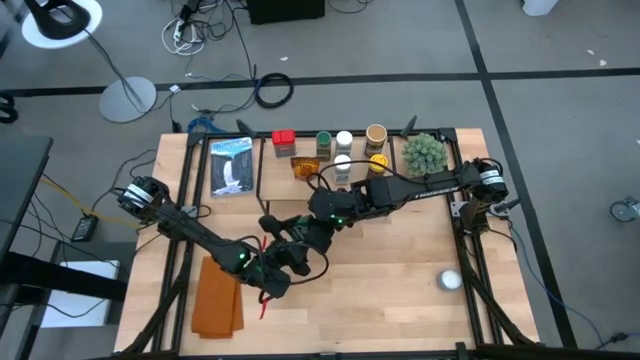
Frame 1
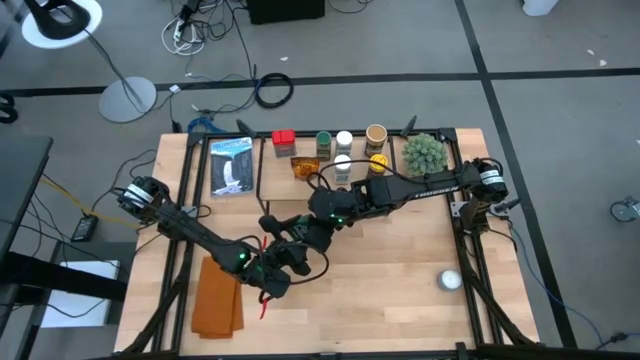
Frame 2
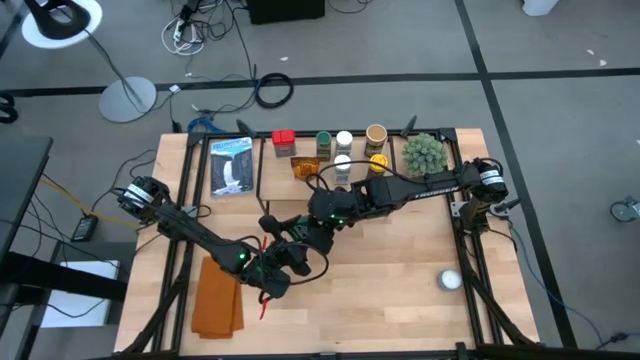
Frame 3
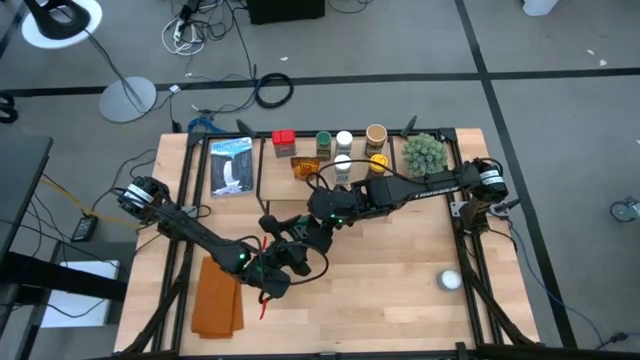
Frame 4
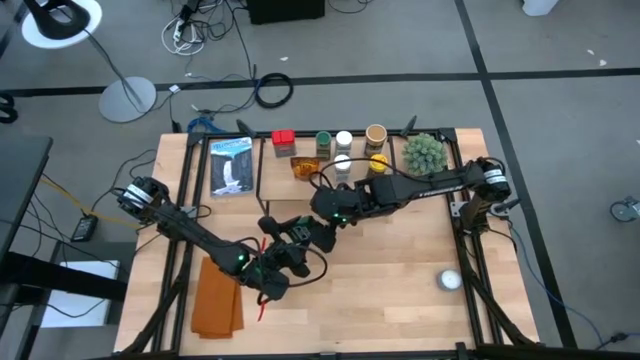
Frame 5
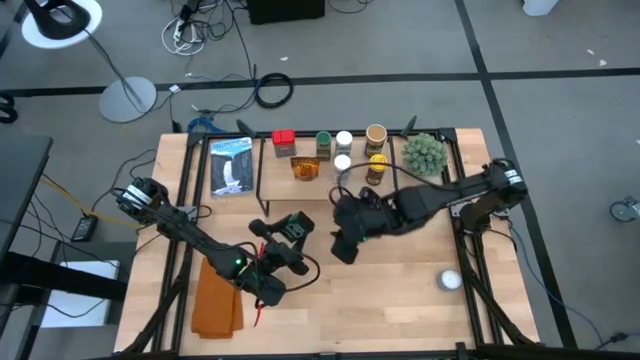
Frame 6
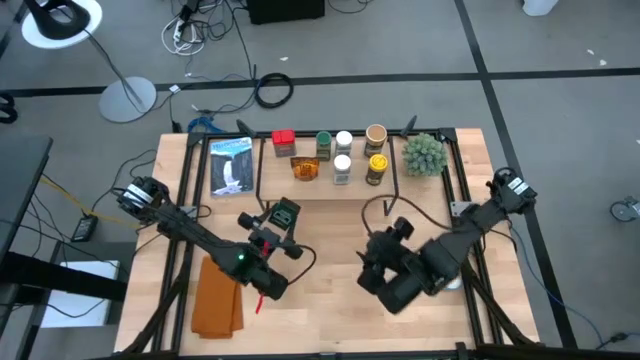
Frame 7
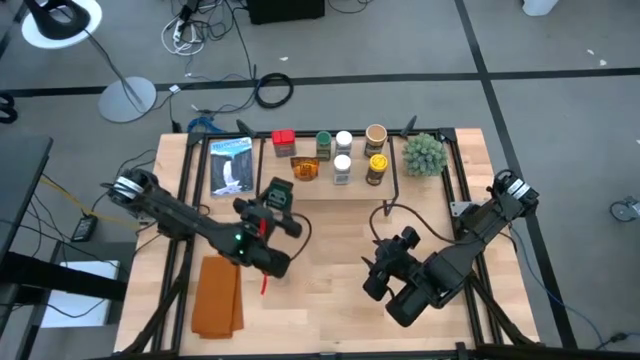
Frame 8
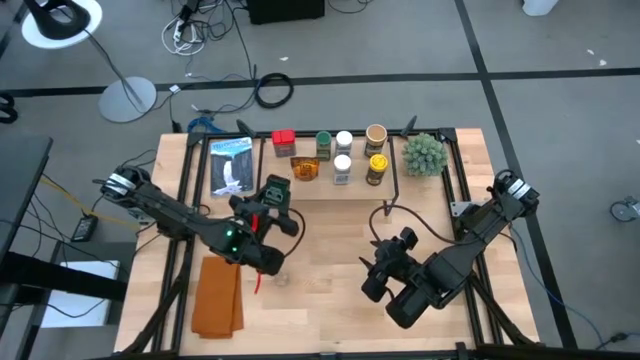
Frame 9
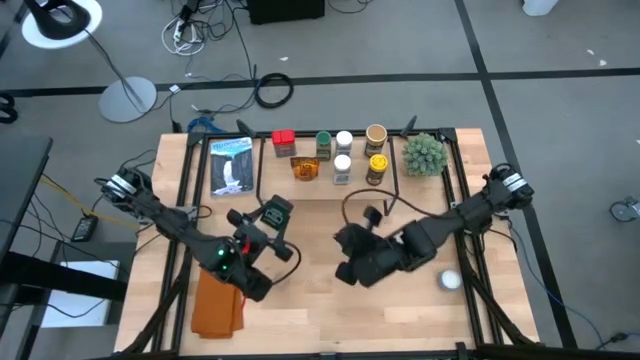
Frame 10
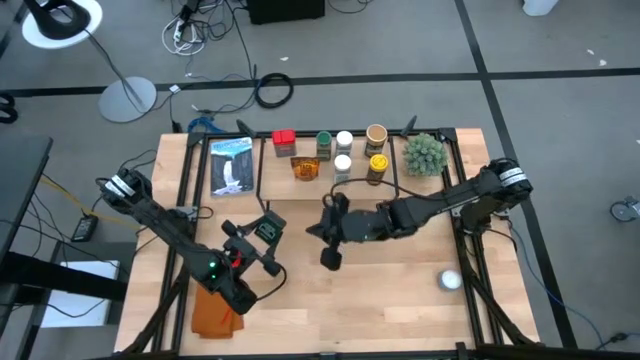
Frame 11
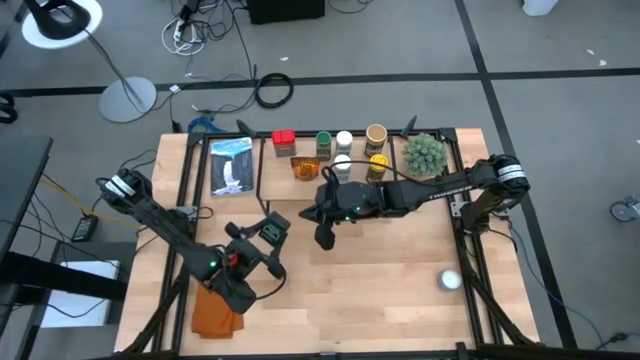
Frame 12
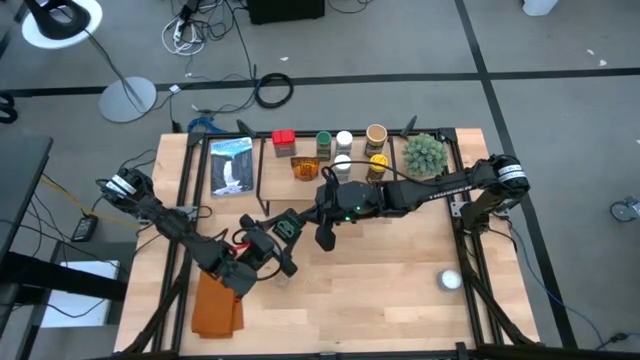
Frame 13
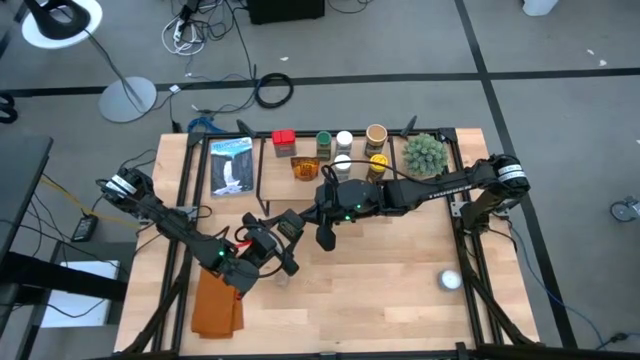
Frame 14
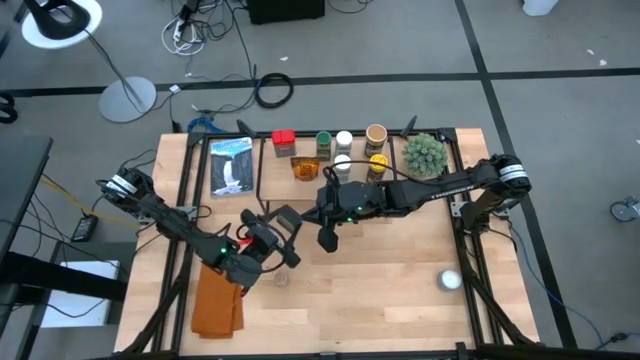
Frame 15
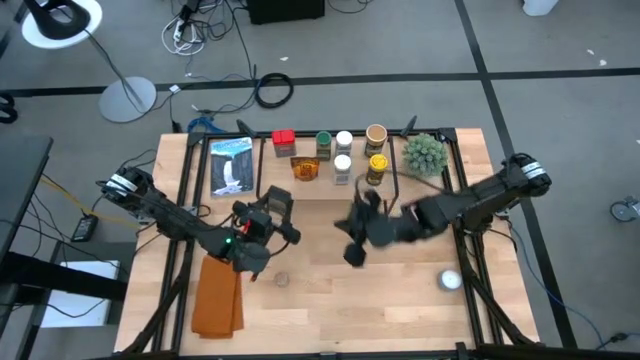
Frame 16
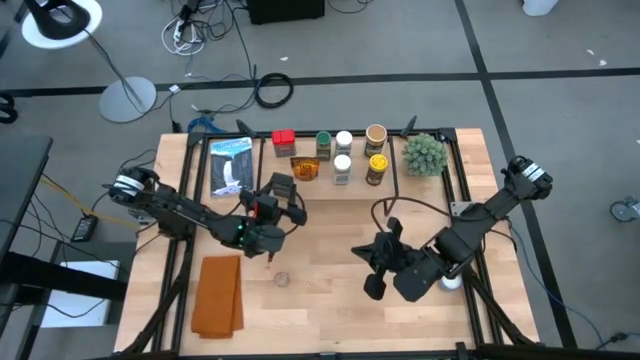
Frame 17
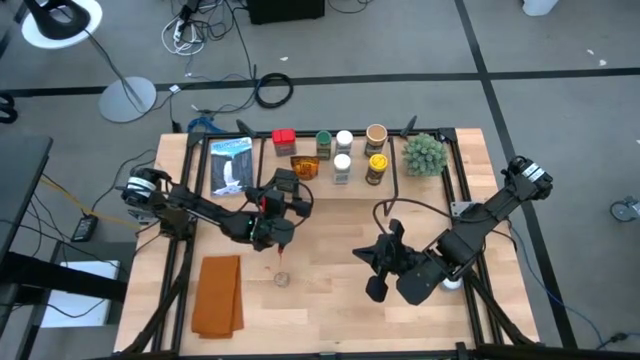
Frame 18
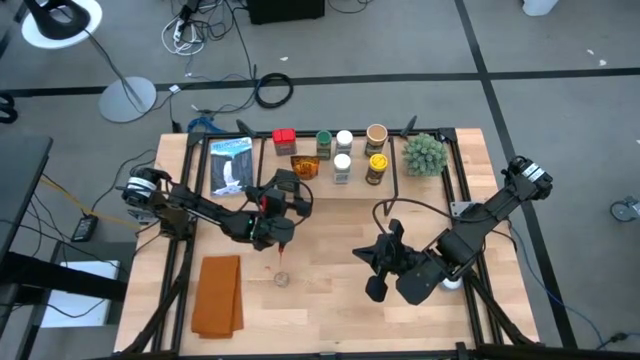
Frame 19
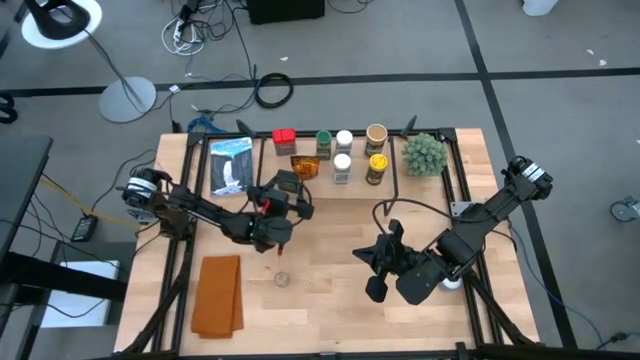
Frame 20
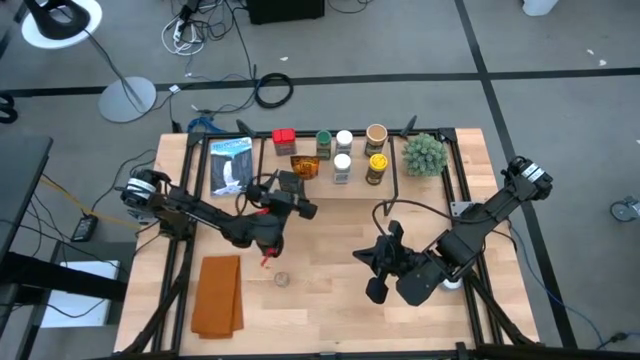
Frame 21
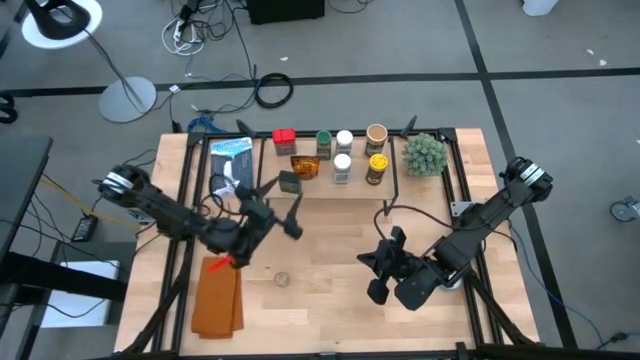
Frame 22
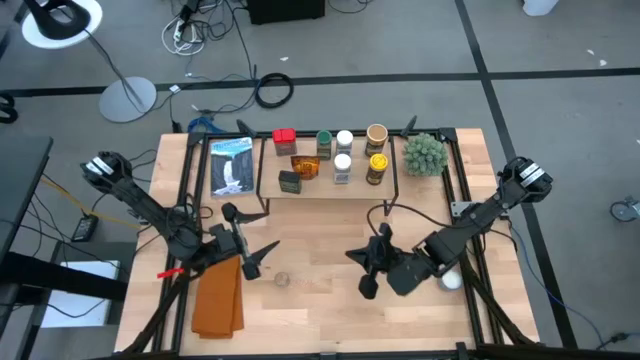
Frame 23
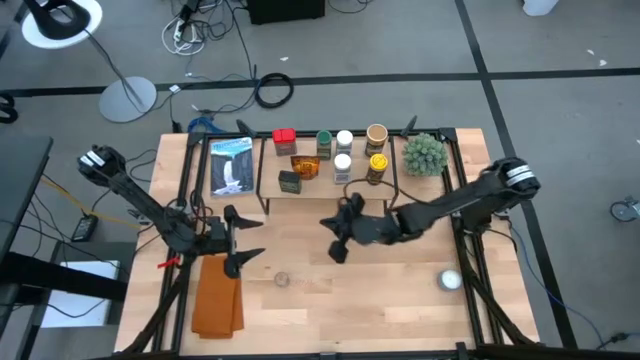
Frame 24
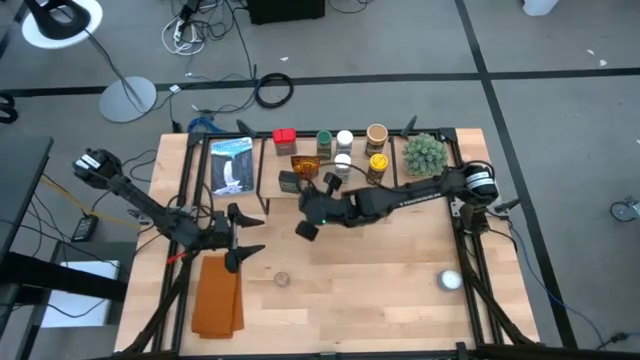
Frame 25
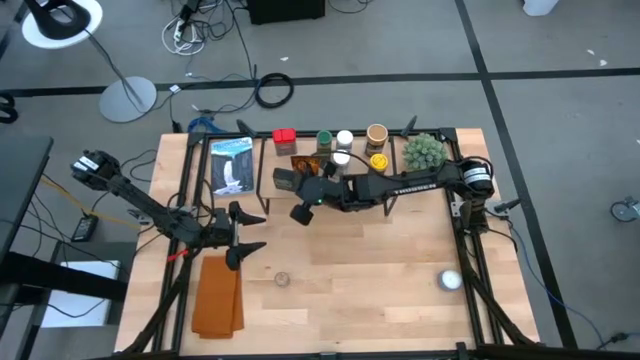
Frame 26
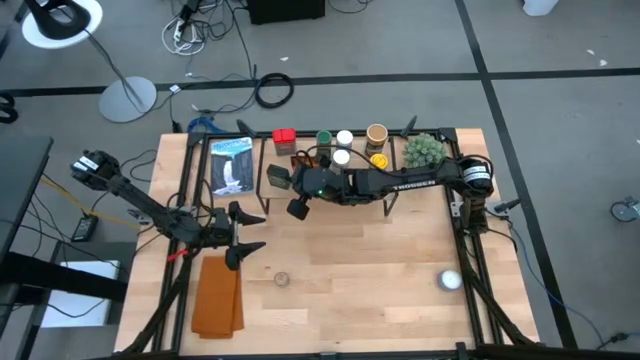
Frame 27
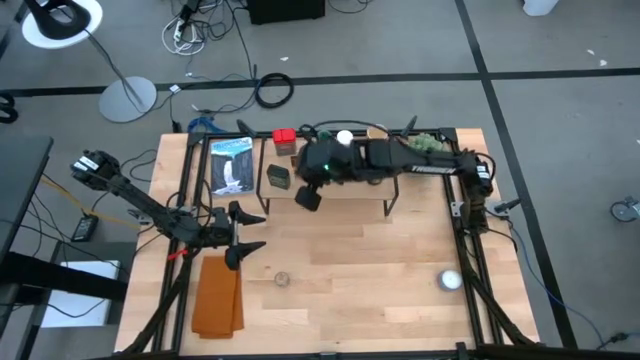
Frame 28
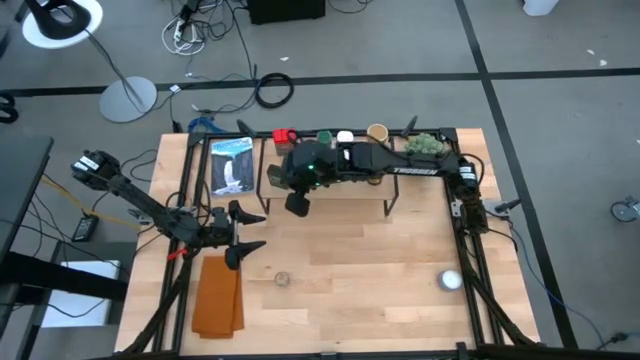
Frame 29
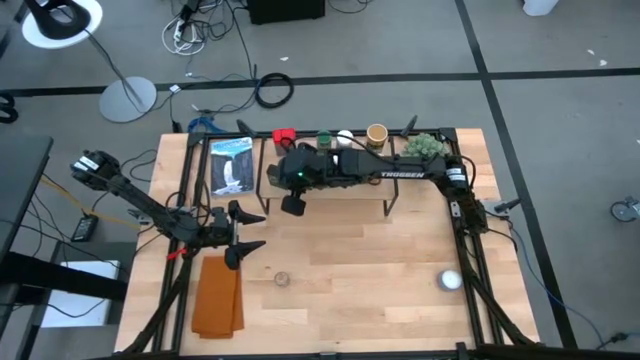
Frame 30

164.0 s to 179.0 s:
Task: Shelf spices
Put the black seasoning can on the shelf

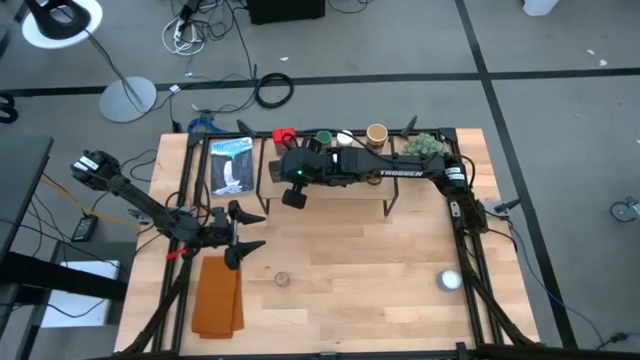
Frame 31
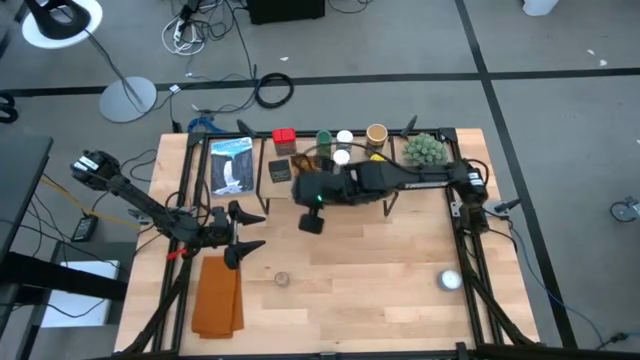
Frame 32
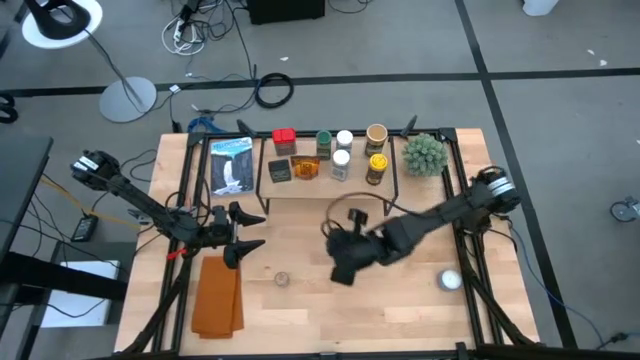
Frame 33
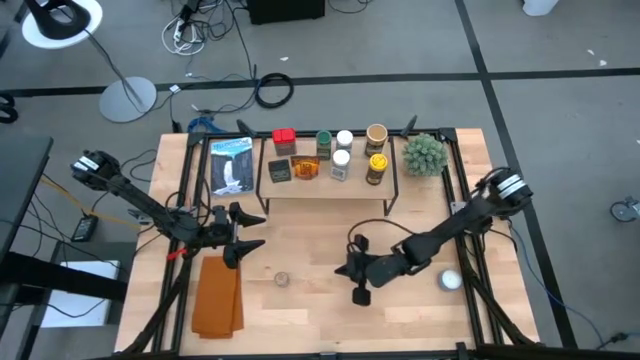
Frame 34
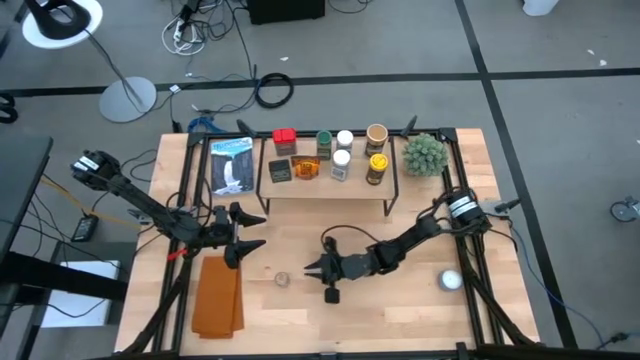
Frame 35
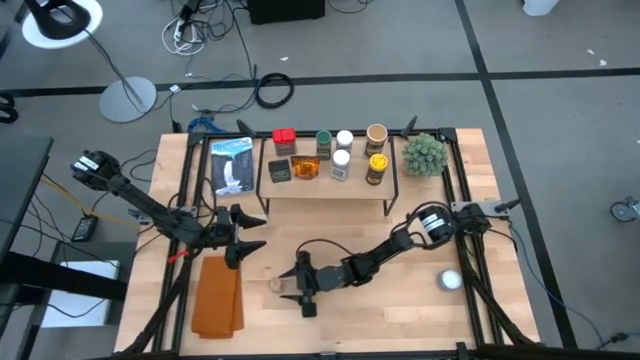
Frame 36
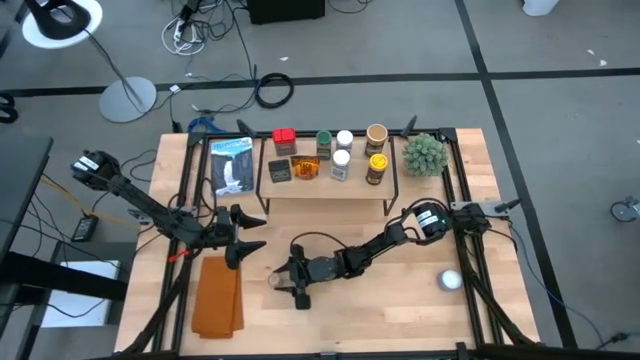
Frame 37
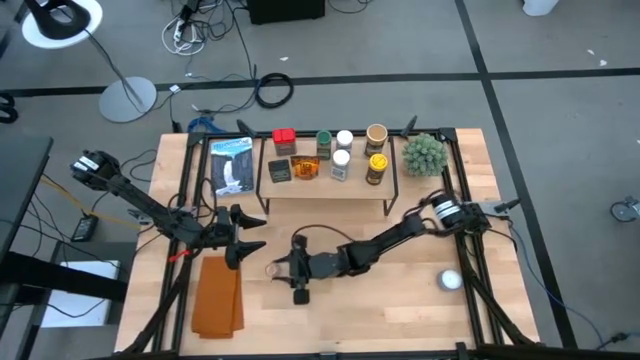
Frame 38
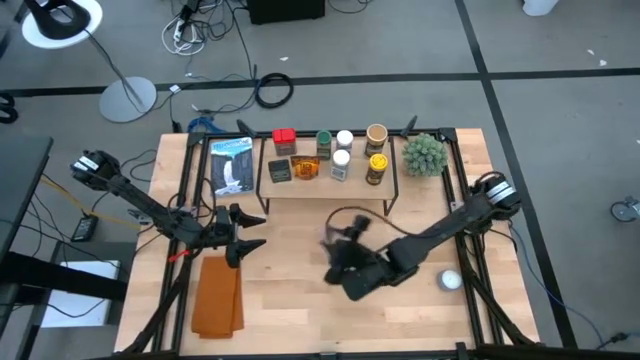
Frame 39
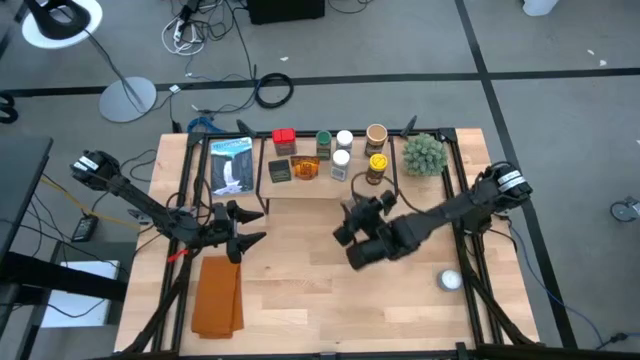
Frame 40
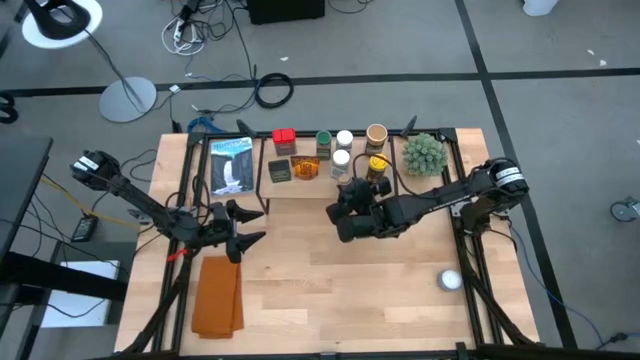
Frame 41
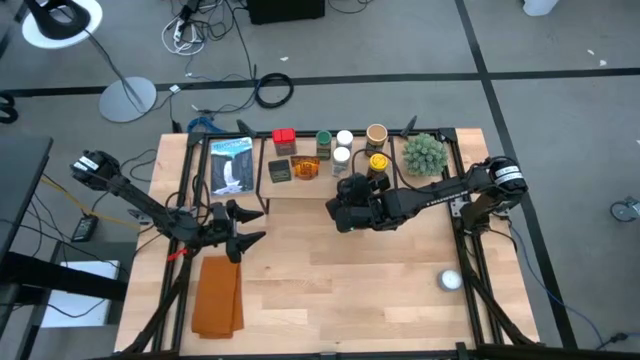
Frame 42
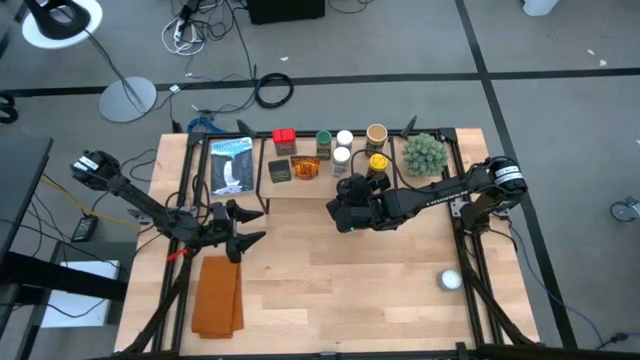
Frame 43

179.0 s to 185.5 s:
Put the brown seasoning bottle on the shelf
